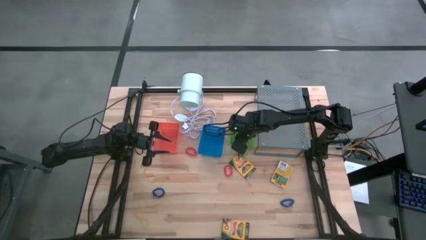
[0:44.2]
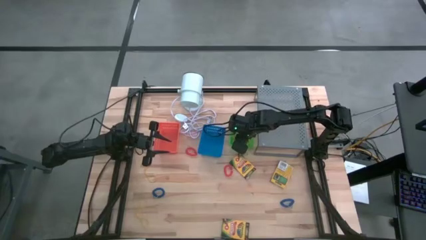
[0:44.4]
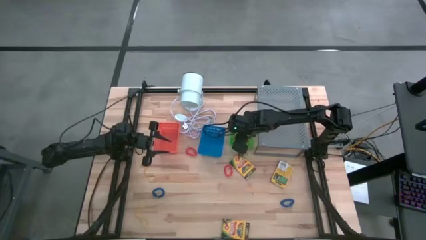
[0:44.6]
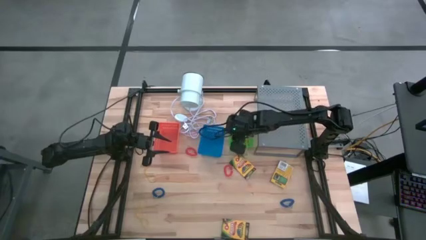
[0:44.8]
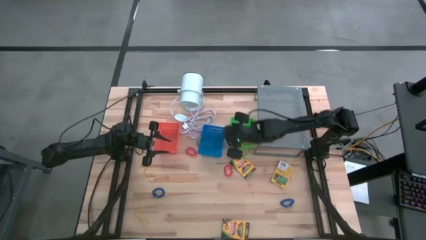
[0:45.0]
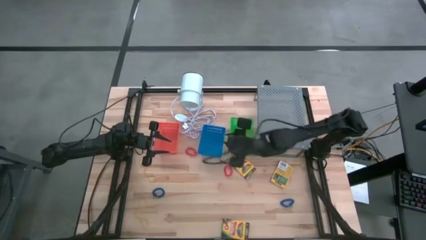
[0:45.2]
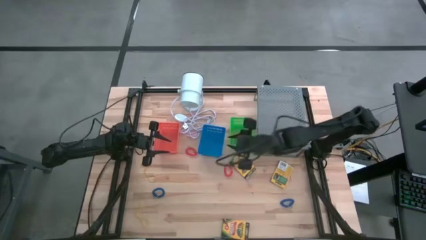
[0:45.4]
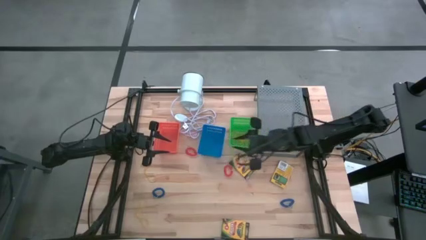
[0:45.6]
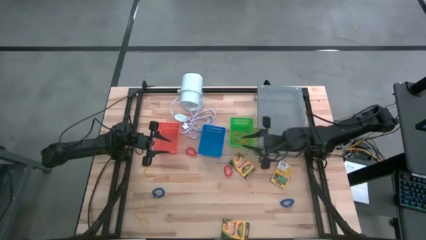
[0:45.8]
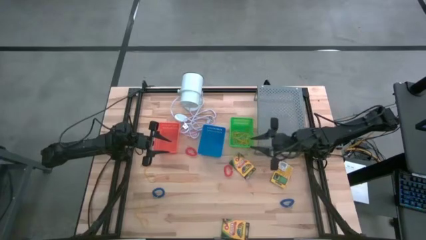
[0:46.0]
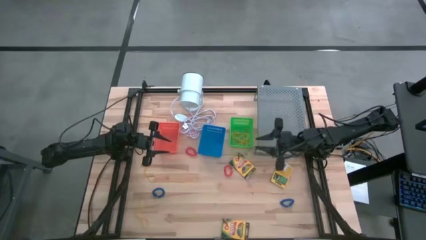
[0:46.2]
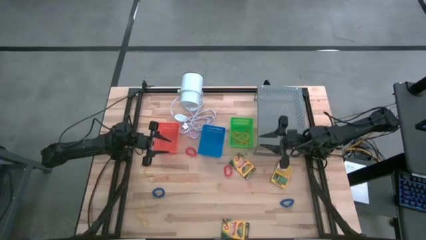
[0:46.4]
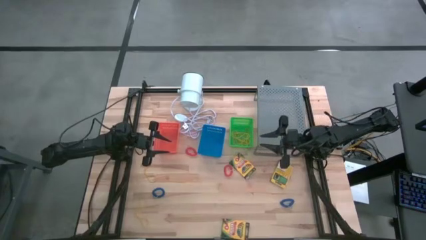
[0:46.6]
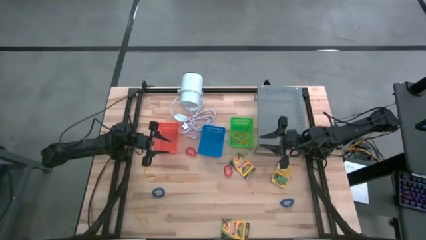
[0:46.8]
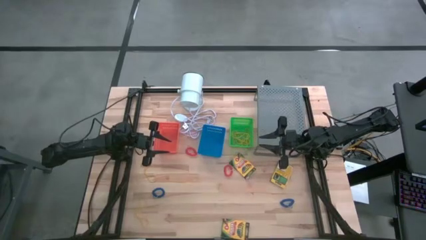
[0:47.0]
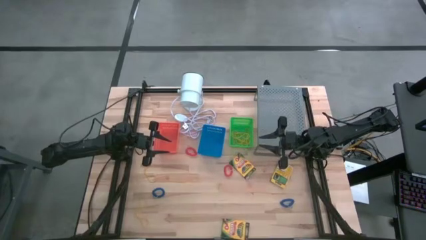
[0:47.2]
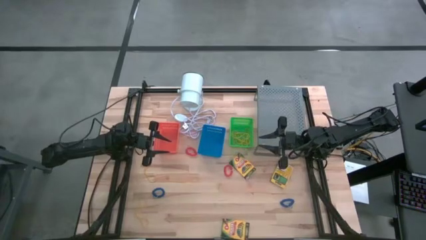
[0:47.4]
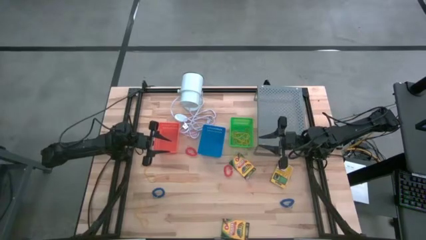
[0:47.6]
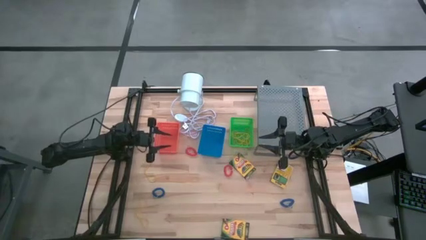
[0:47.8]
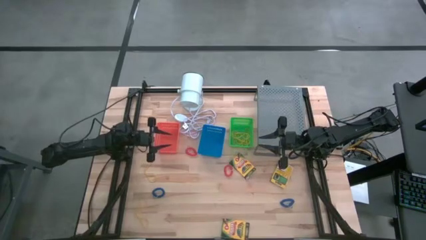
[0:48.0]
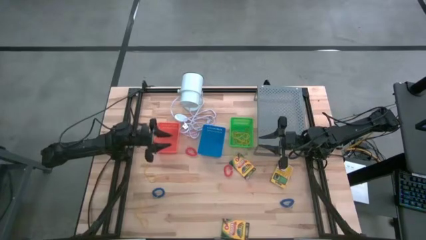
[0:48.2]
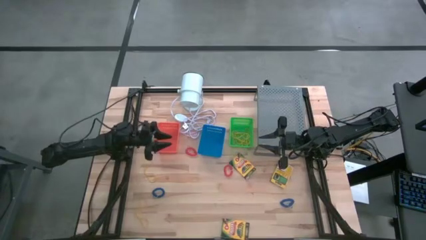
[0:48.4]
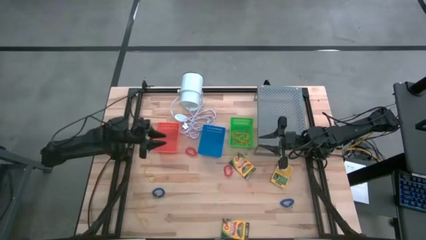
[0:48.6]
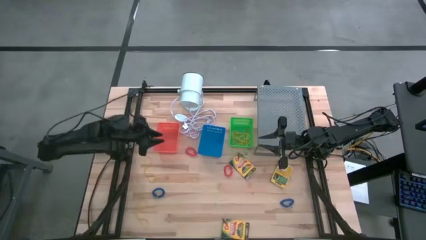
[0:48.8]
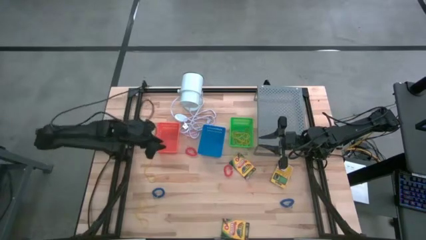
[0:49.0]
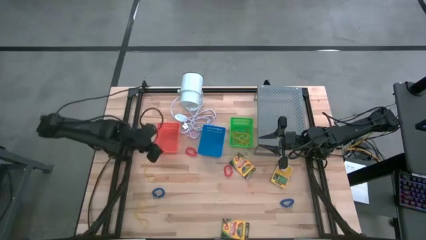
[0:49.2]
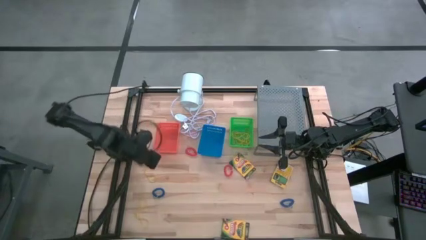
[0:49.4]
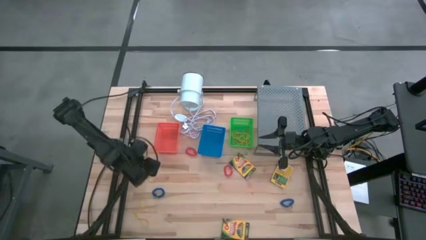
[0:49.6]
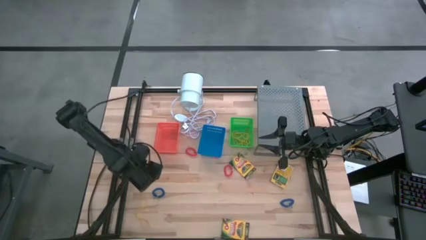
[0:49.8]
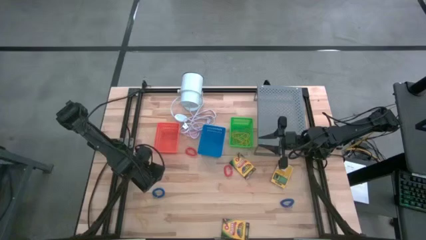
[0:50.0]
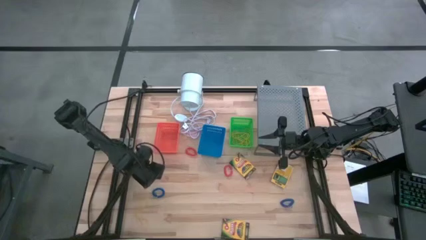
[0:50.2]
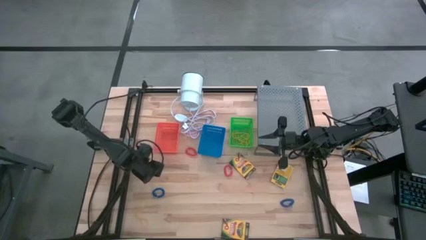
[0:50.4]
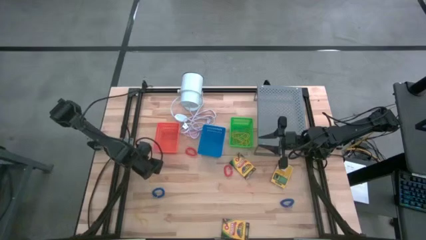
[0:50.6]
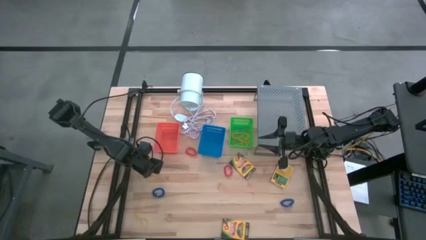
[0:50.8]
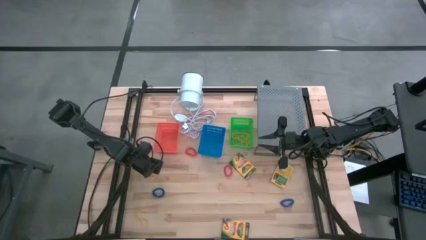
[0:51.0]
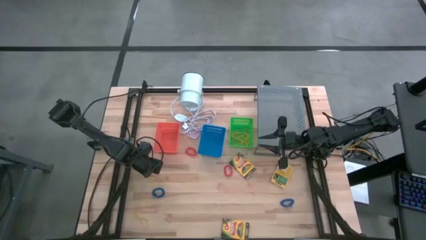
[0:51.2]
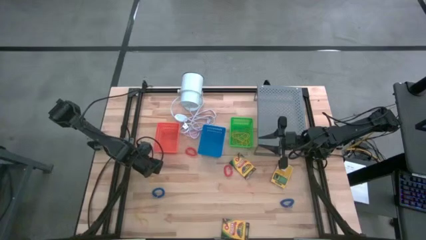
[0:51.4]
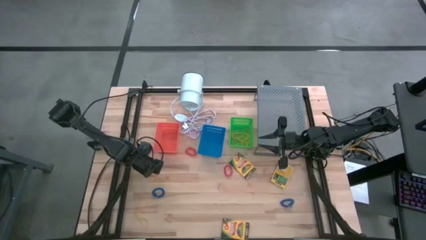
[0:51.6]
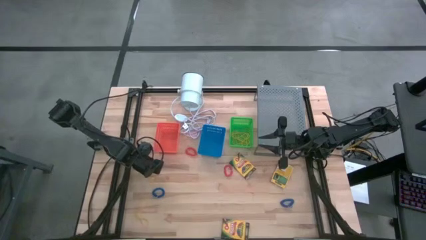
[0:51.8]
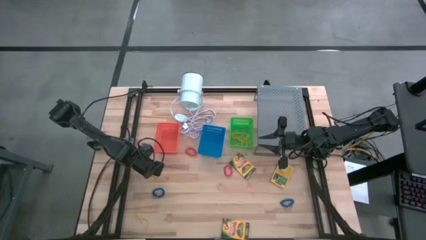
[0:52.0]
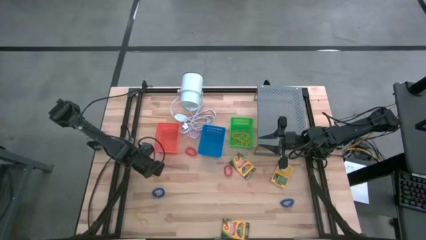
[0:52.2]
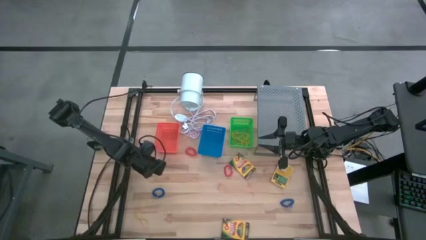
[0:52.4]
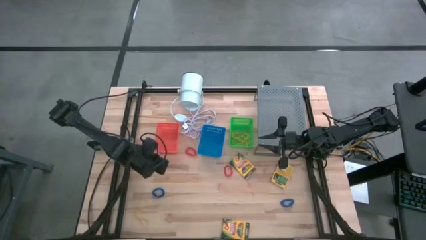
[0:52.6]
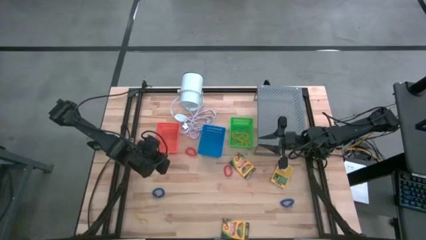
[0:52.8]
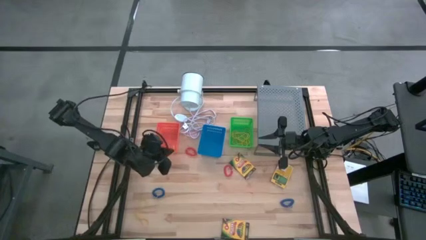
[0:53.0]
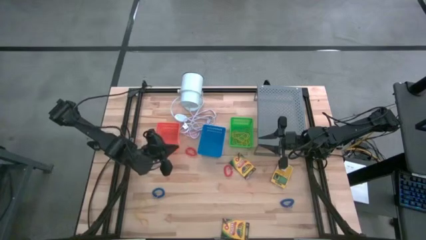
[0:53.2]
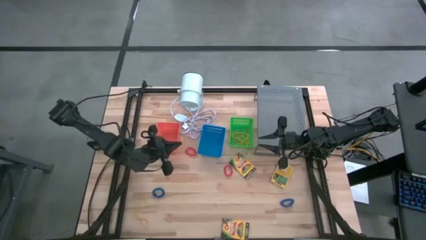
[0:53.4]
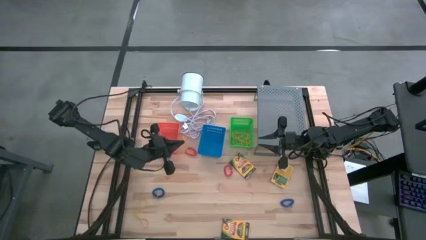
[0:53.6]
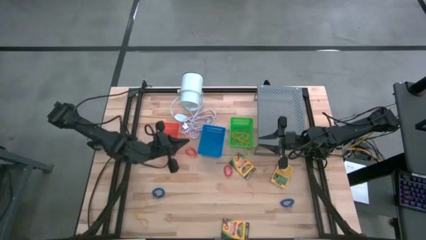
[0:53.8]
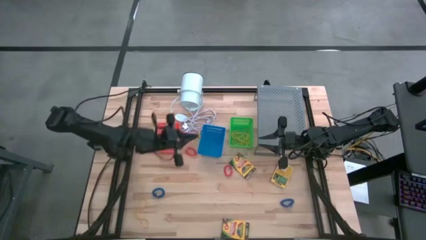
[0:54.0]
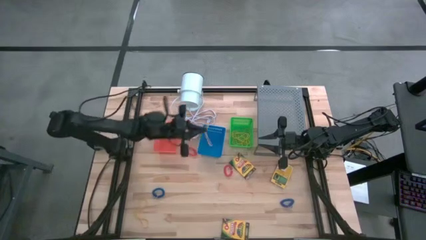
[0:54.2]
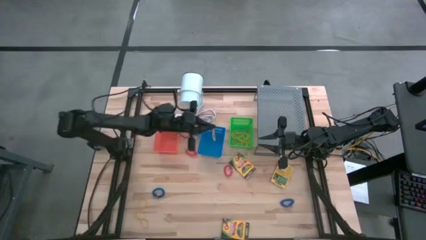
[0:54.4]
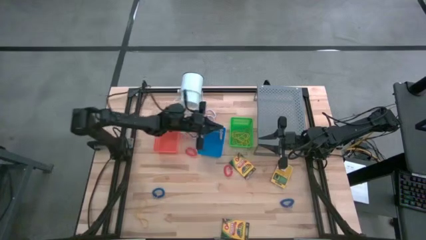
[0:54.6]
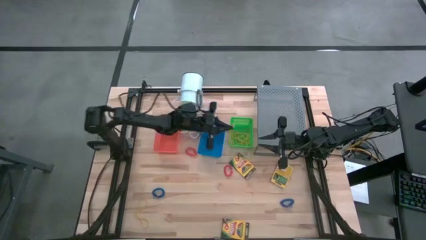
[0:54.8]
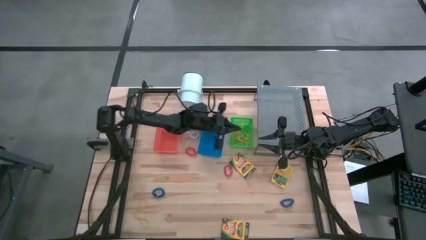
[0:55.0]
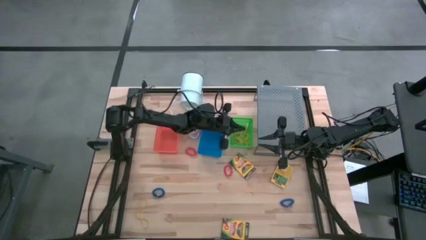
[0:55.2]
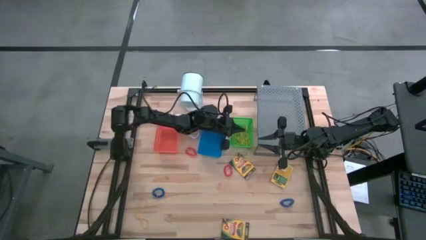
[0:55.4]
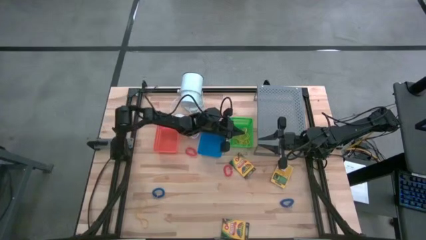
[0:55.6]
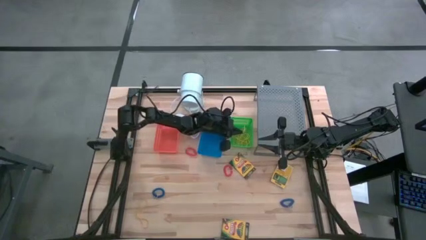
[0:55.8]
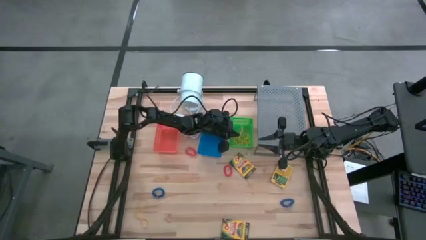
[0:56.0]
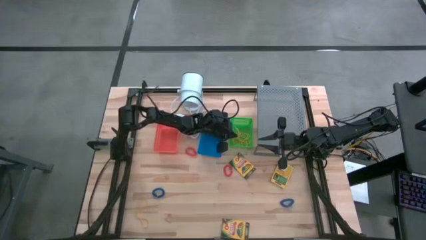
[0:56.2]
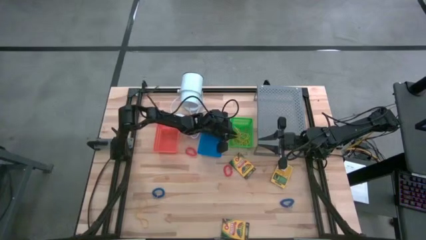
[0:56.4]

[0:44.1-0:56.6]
Task: Pick & Place Office Desk Supplies
Put the yellow rubber band into the green bin
